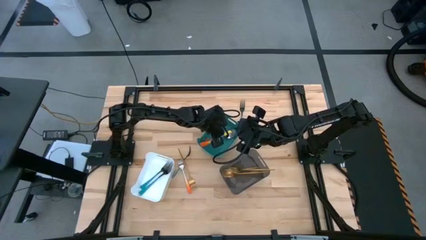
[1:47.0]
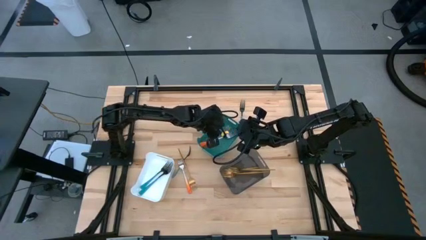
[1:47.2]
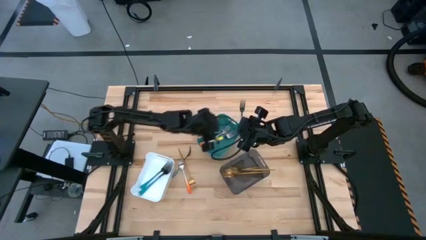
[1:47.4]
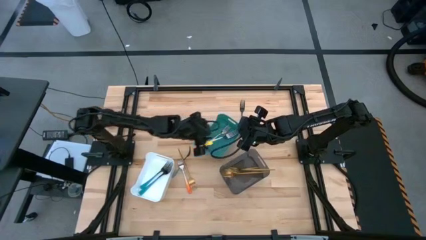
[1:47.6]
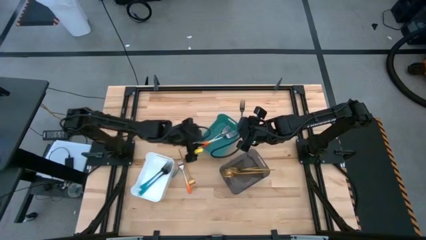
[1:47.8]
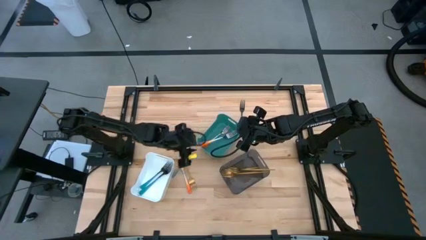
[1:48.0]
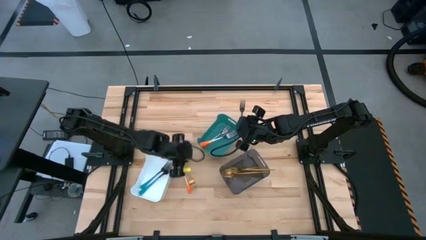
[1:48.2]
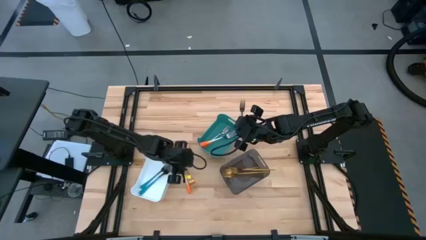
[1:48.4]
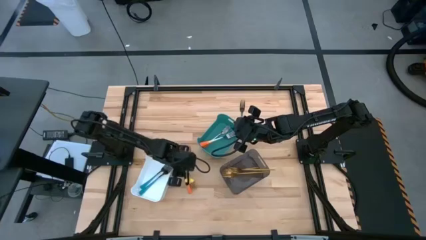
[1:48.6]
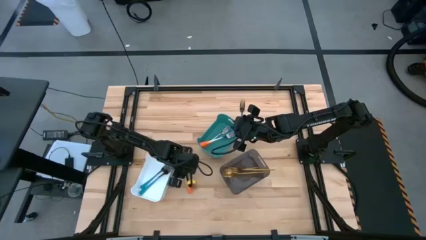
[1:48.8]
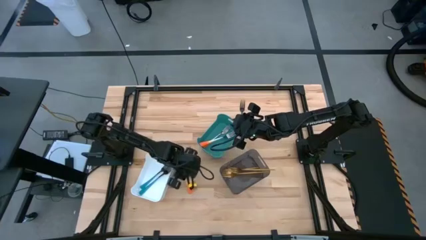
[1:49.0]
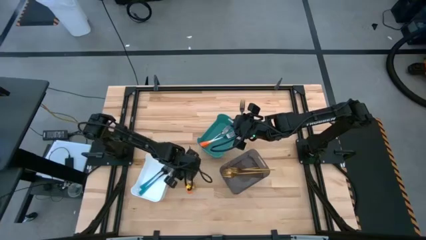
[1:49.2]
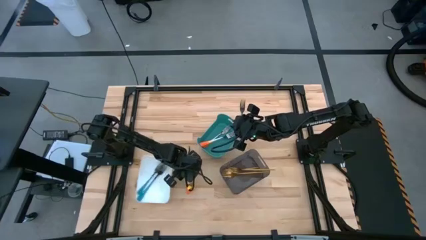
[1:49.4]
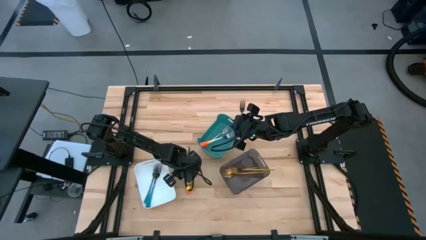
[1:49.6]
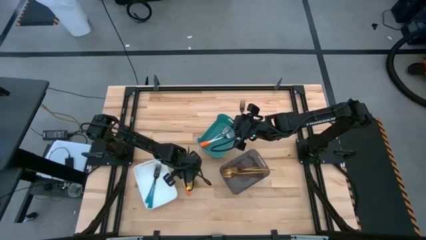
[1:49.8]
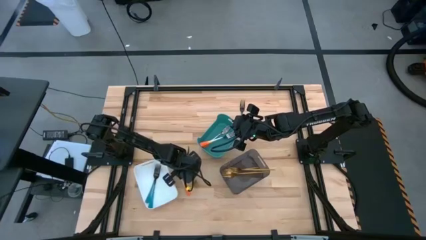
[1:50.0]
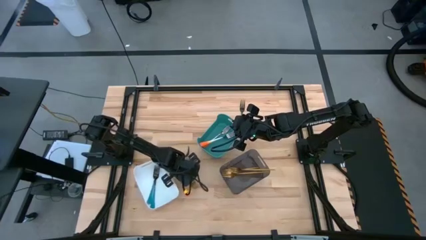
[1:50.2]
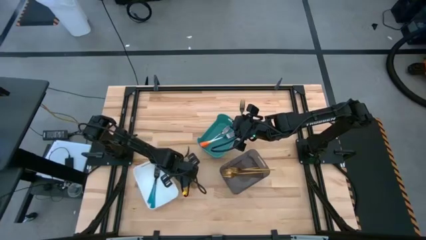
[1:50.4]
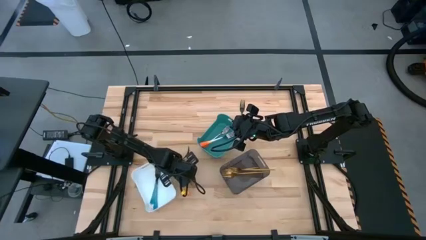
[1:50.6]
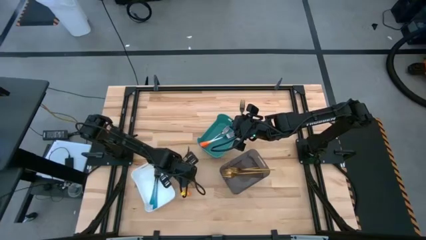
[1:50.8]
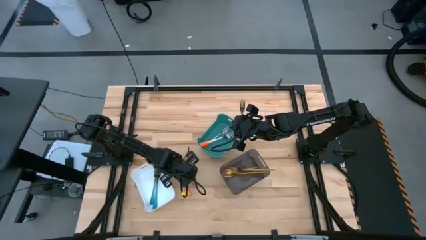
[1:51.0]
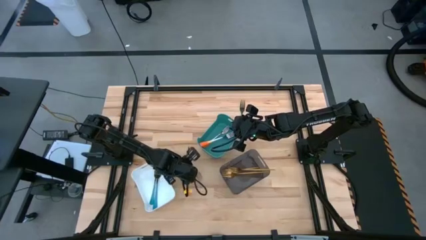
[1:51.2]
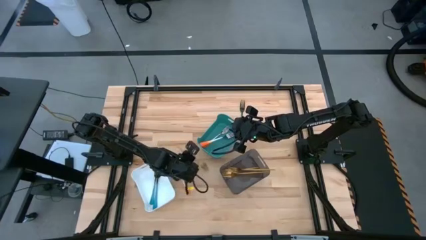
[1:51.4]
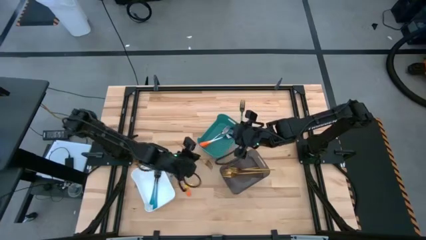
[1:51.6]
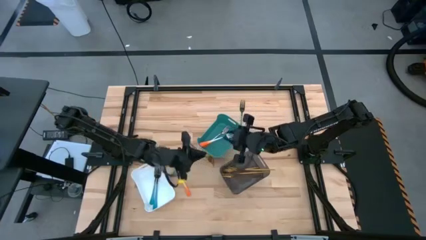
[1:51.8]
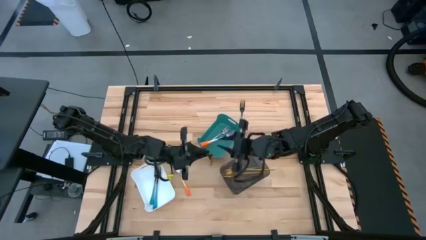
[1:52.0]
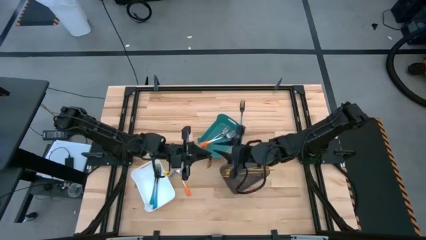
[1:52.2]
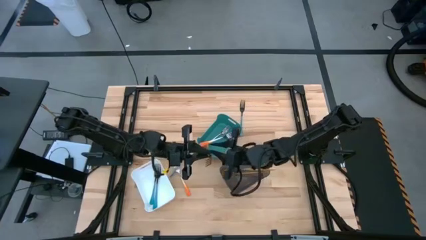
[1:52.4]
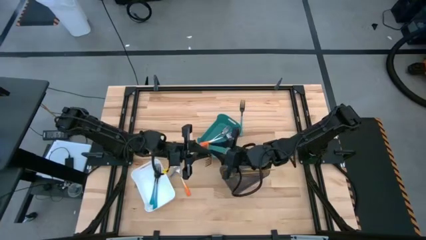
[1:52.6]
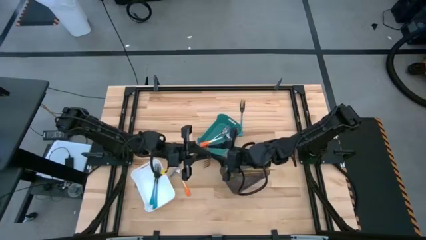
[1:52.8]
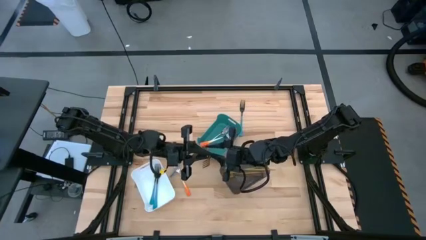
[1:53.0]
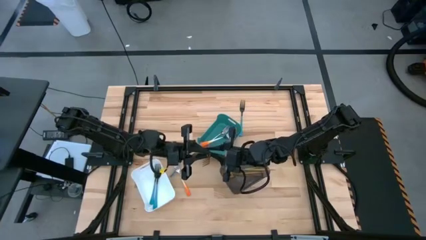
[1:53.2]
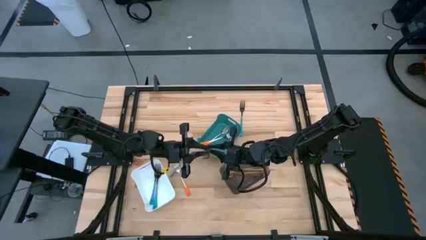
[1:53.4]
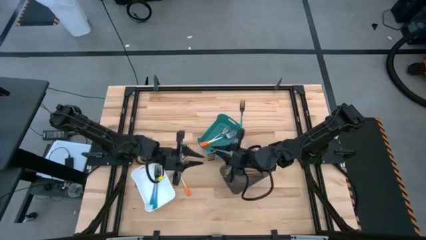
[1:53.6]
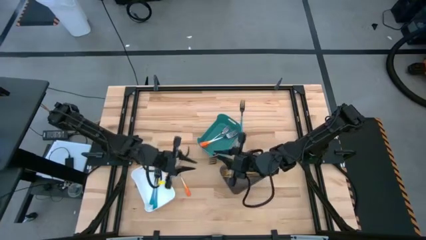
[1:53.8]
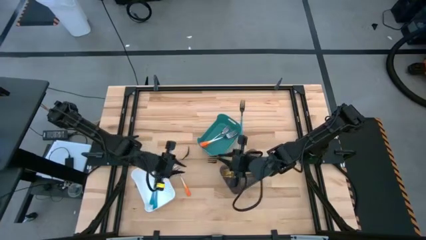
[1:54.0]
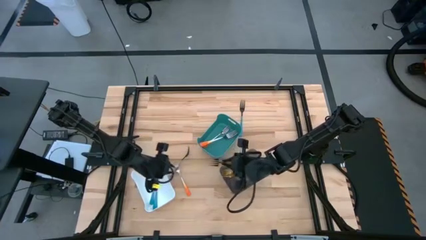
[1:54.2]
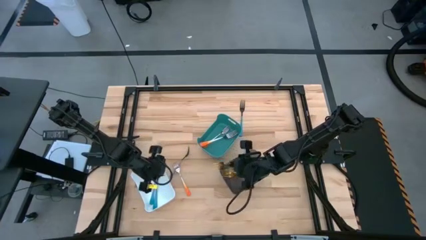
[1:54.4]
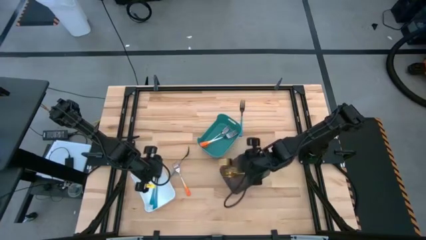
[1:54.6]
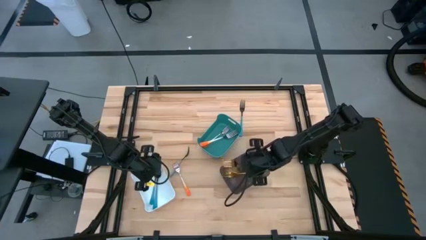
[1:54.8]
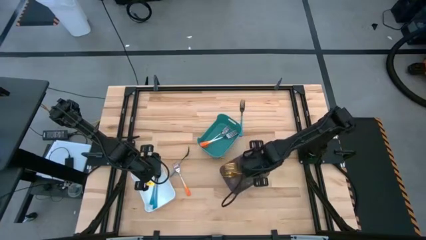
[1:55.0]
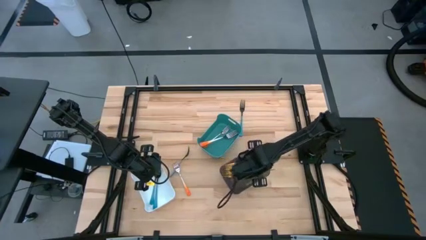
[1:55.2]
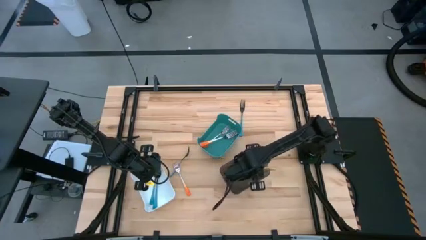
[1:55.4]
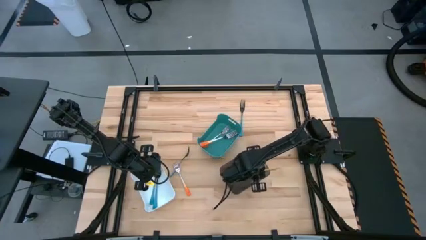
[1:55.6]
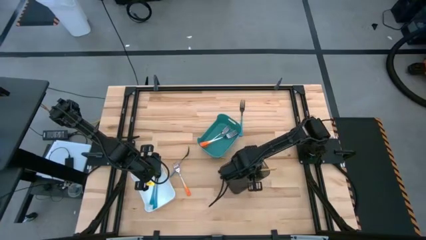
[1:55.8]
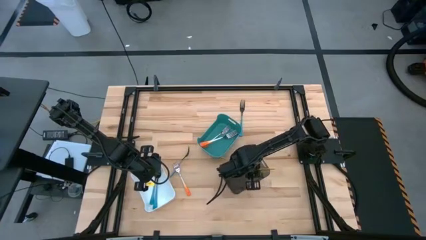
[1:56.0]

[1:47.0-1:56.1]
Task: Sort silverware by color (type)
Put the gold fork into the black transparent bin

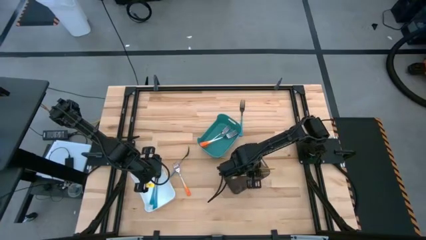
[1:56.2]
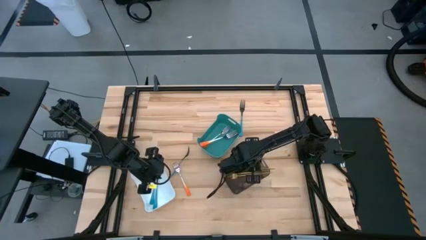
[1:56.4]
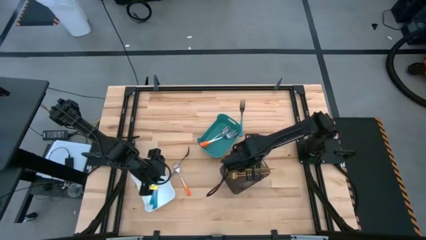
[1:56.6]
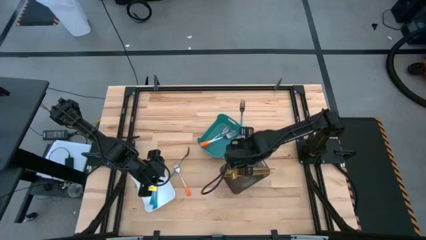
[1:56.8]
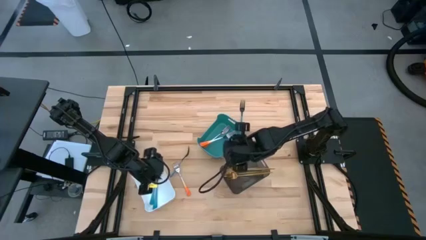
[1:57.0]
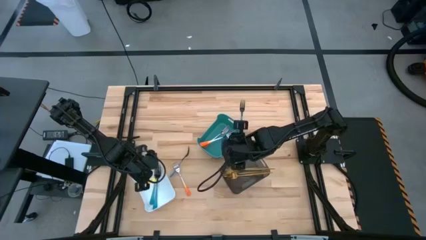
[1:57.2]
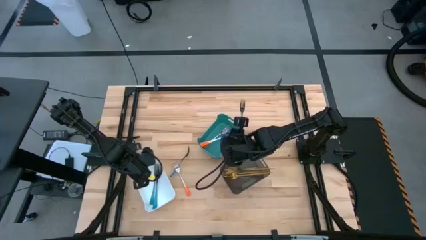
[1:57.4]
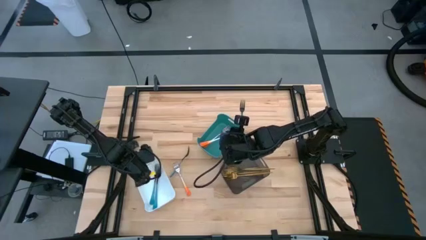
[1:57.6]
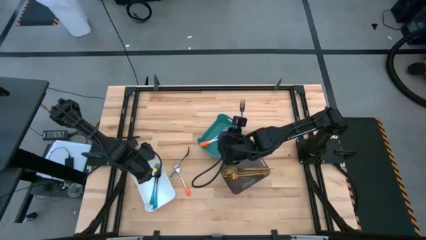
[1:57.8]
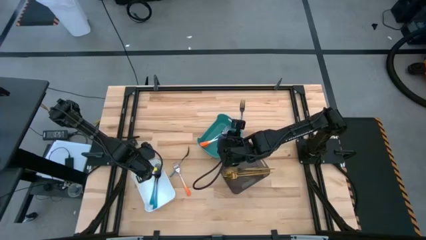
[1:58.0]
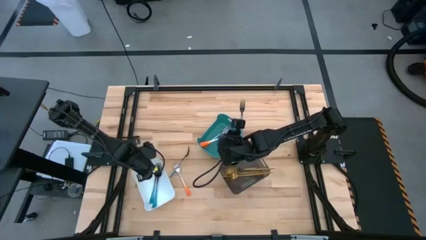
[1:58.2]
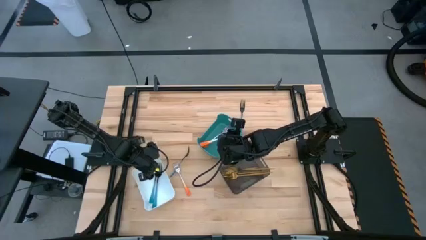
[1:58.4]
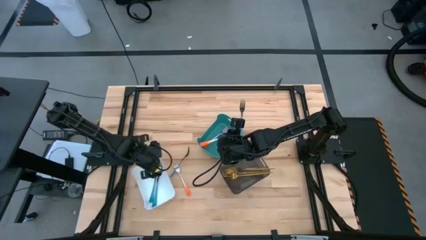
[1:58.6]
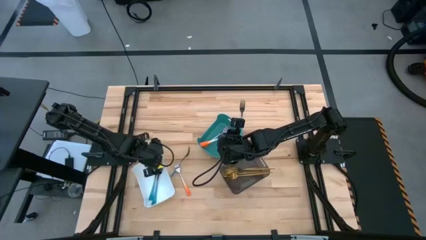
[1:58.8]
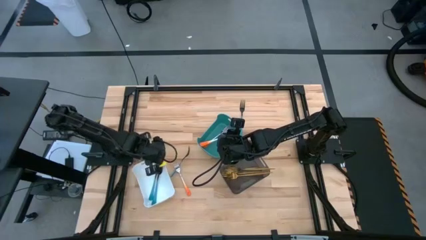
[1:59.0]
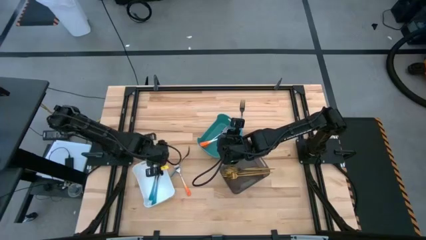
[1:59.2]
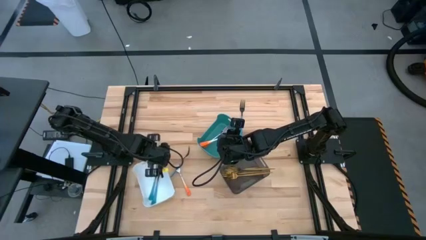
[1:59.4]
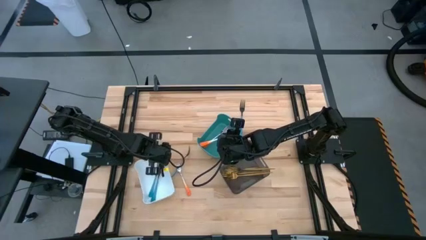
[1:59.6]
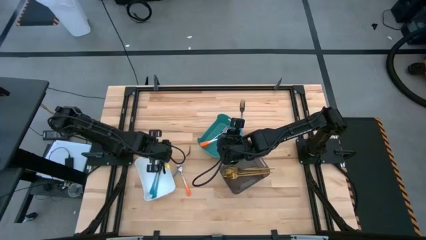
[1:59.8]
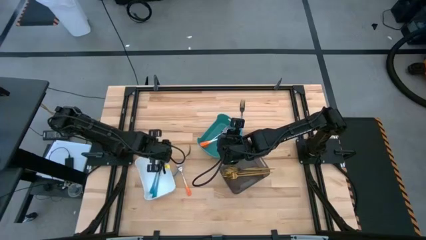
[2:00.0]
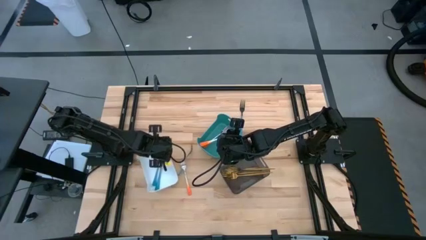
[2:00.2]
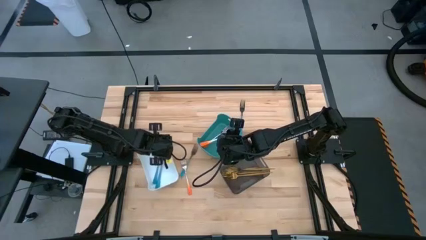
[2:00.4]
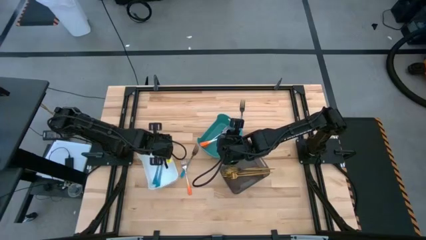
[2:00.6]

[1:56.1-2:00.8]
Adjust the white bin

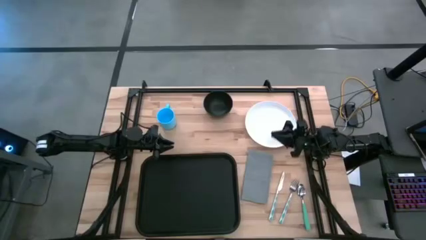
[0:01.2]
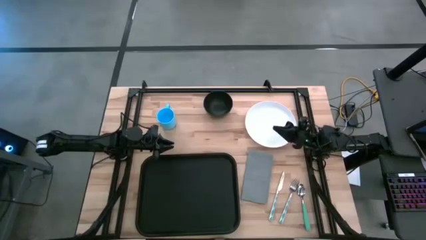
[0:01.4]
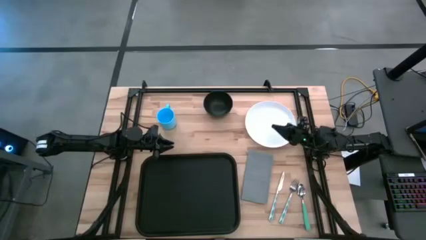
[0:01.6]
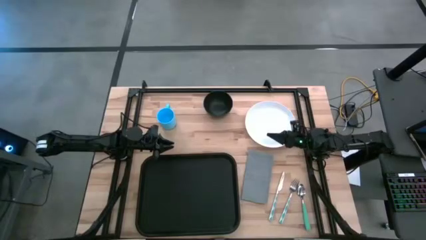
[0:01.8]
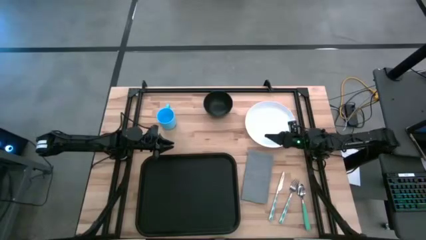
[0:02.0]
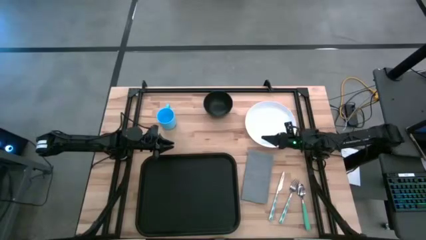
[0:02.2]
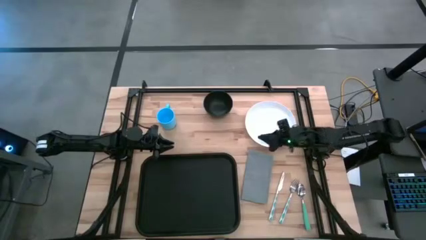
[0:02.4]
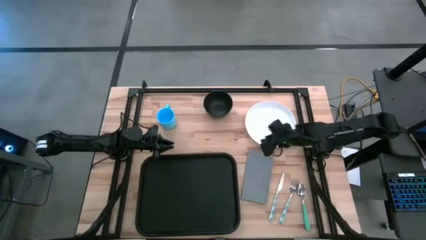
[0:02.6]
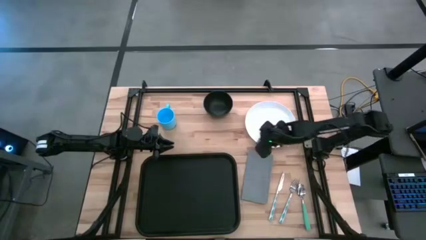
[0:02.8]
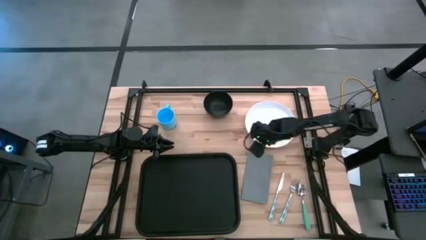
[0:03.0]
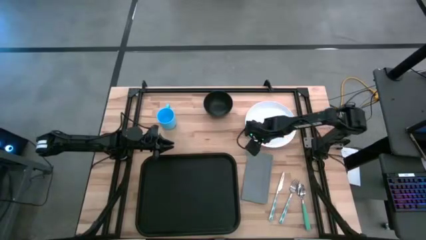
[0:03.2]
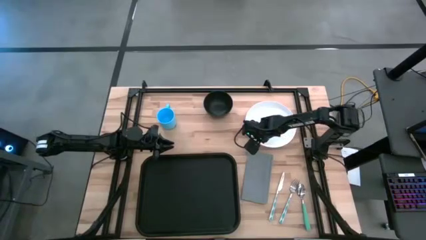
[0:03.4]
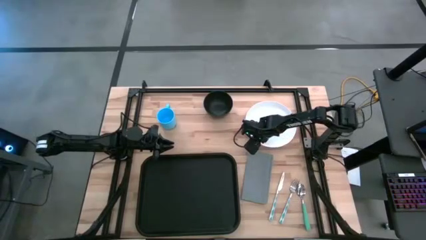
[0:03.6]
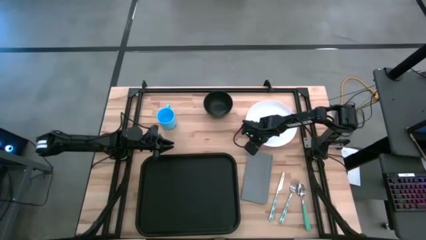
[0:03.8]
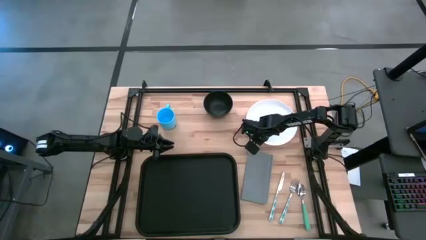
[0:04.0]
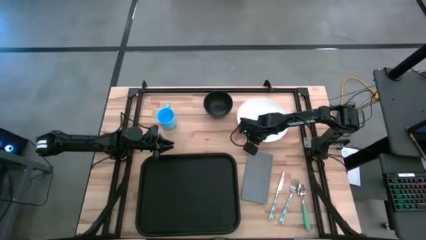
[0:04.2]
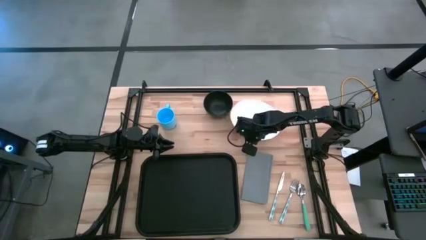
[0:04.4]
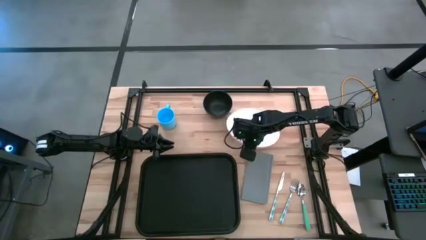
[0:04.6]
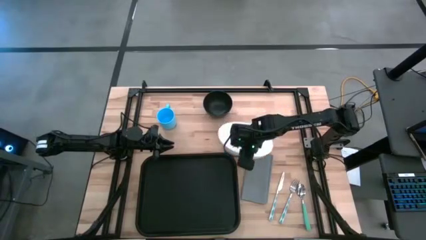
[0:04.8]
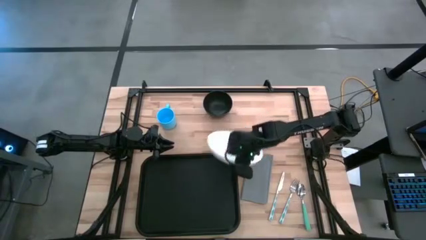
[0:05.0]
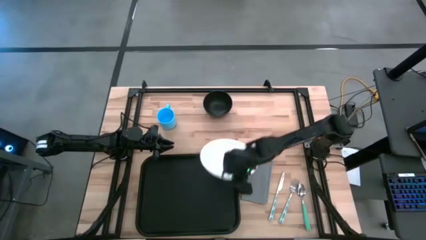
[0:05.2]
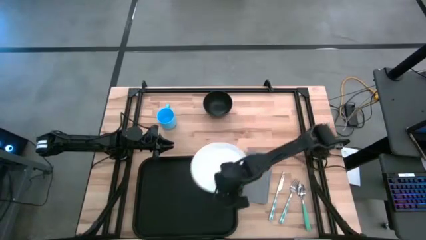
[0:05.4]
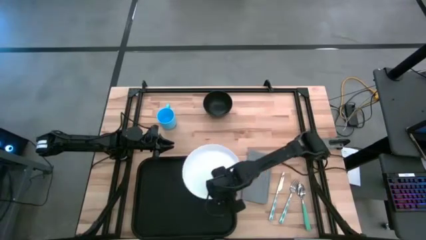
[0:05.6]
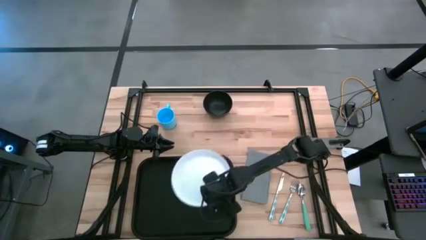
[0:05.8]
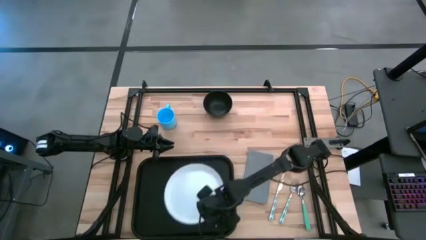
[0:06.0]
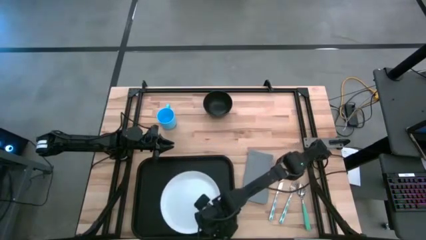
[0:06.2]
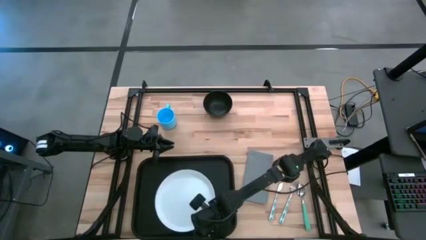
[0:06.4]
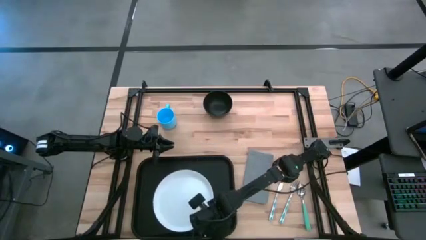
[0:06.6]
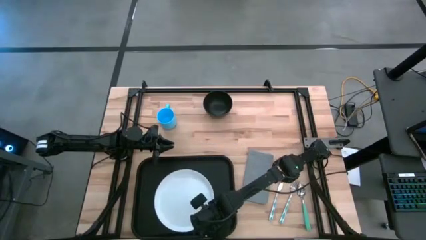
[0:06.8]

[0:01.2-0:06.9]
Task: Set up tray
Put the white plate on the black serving tray
